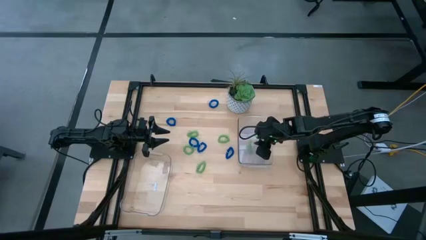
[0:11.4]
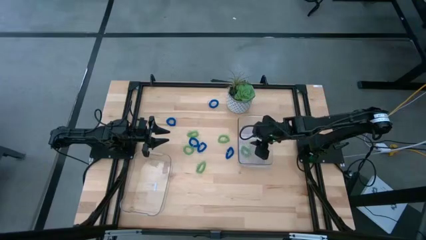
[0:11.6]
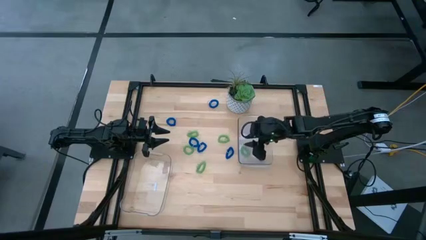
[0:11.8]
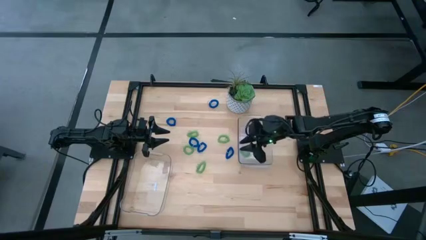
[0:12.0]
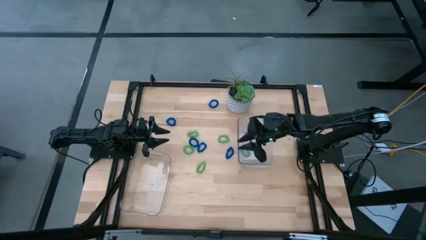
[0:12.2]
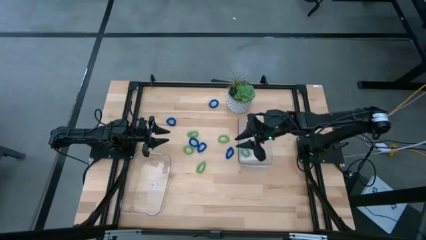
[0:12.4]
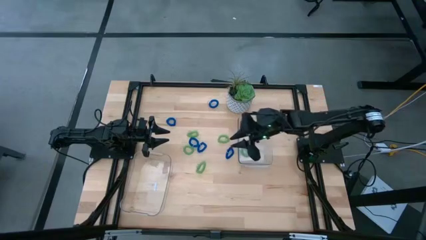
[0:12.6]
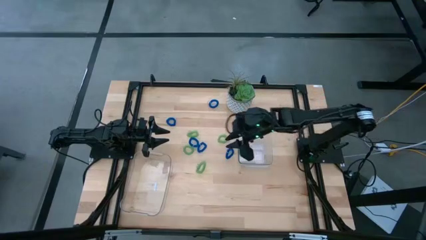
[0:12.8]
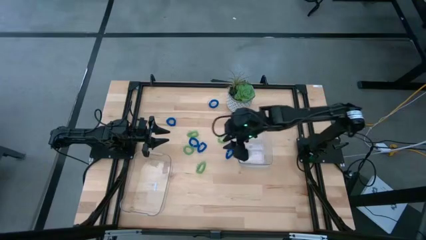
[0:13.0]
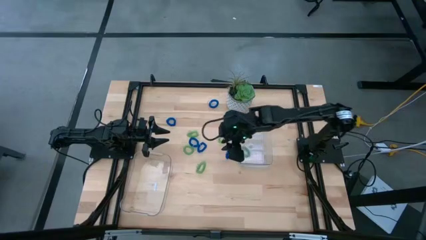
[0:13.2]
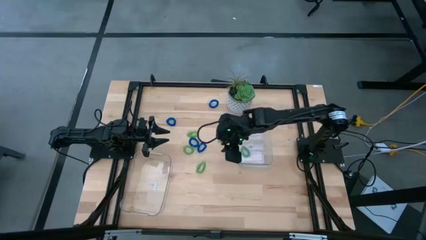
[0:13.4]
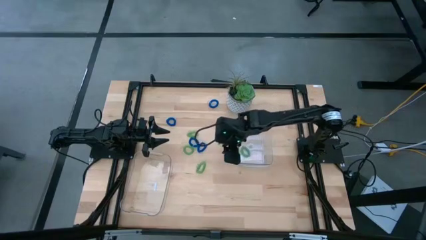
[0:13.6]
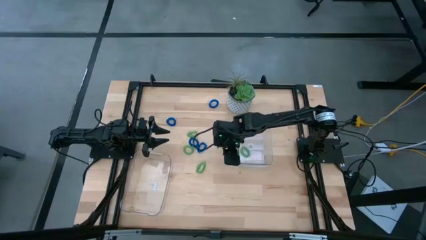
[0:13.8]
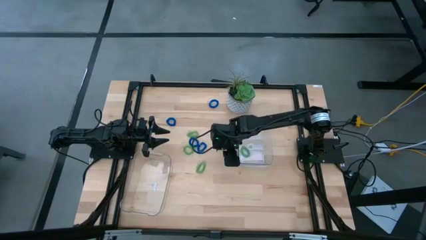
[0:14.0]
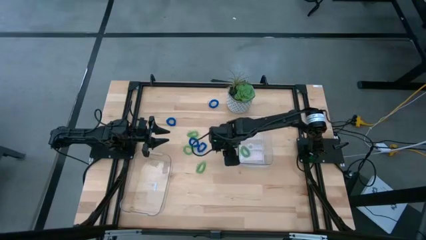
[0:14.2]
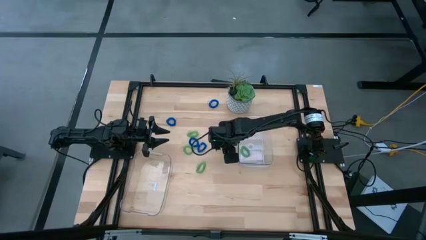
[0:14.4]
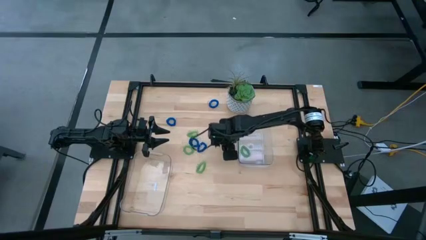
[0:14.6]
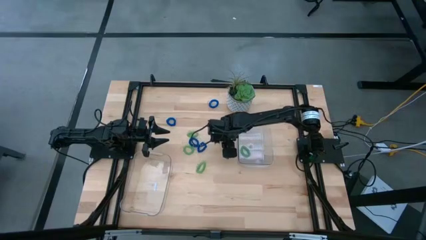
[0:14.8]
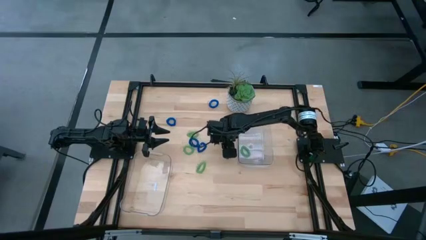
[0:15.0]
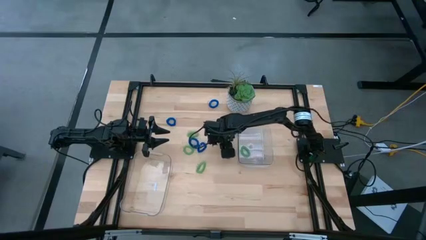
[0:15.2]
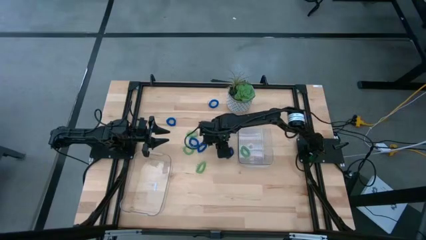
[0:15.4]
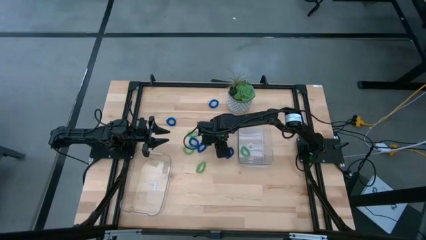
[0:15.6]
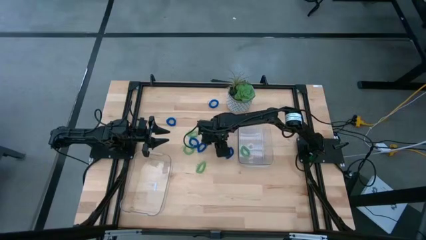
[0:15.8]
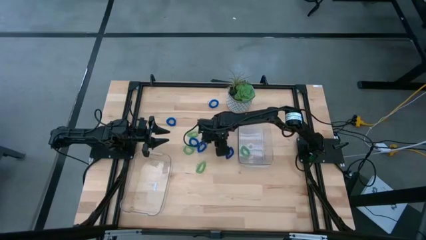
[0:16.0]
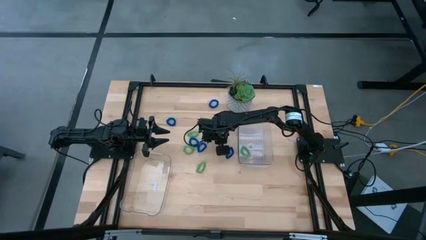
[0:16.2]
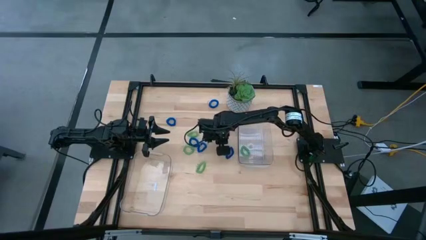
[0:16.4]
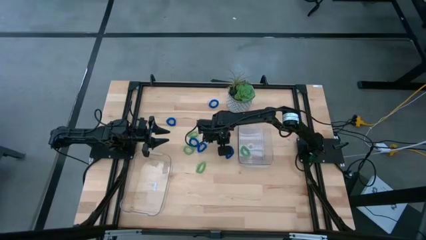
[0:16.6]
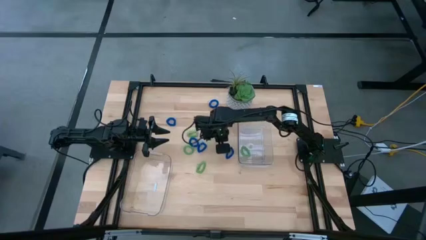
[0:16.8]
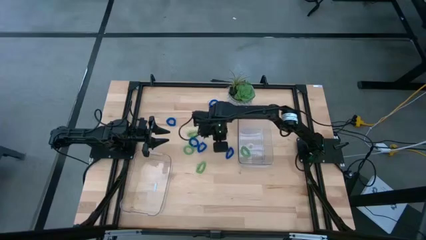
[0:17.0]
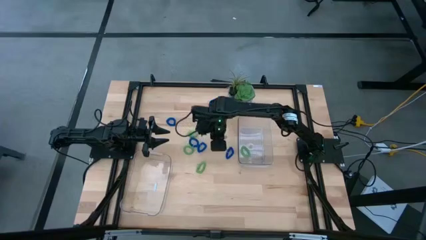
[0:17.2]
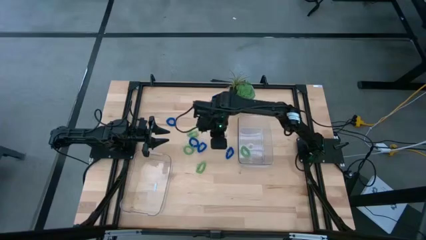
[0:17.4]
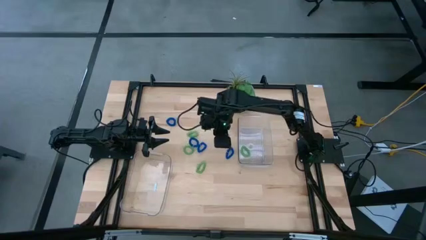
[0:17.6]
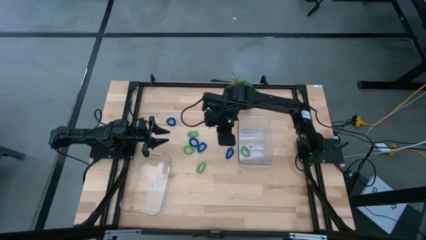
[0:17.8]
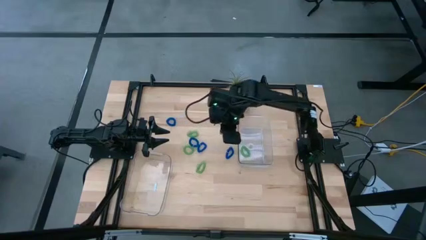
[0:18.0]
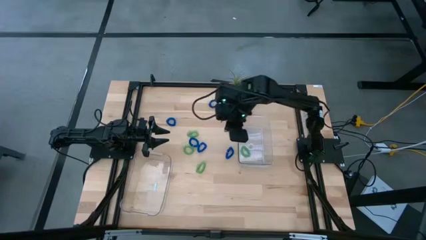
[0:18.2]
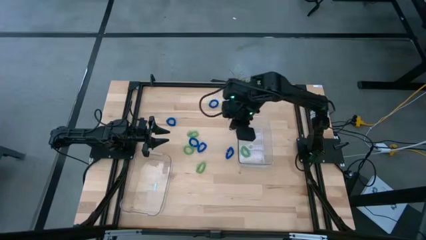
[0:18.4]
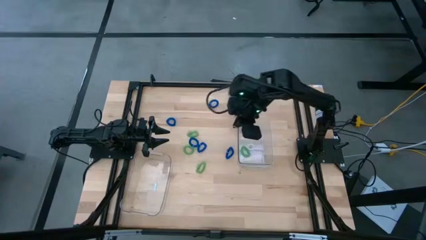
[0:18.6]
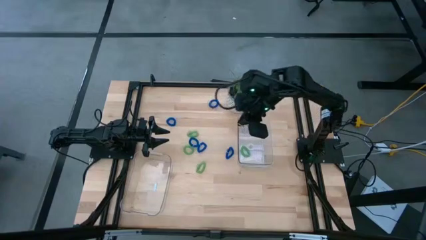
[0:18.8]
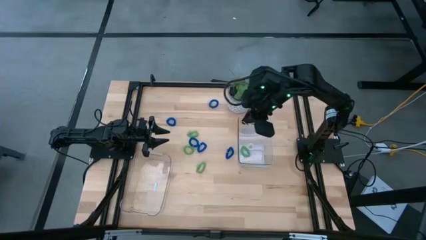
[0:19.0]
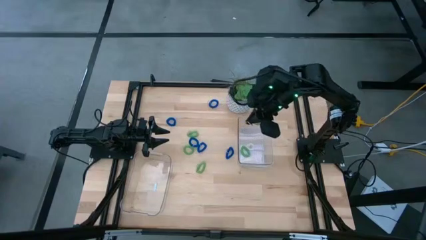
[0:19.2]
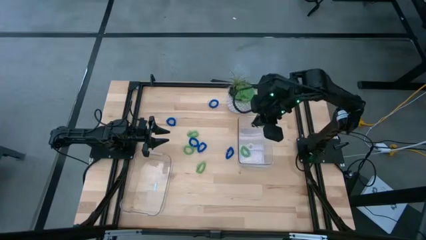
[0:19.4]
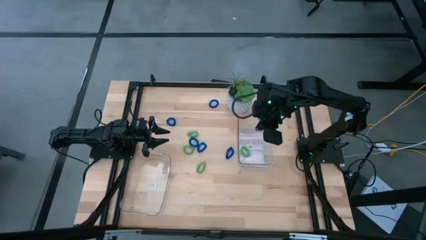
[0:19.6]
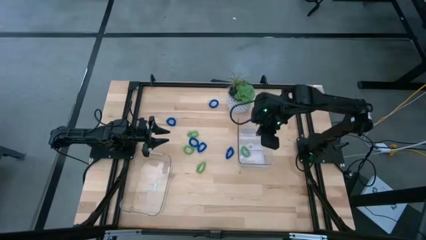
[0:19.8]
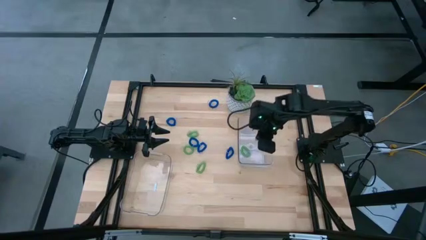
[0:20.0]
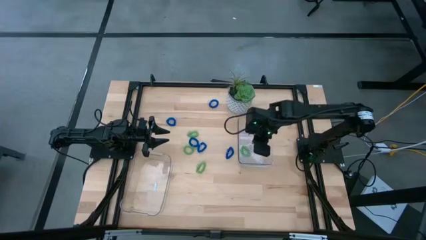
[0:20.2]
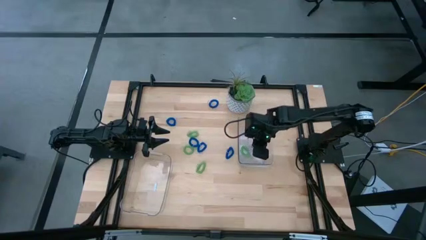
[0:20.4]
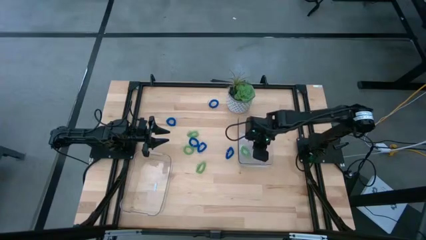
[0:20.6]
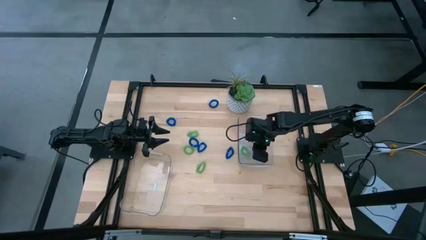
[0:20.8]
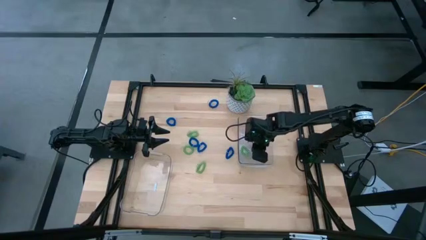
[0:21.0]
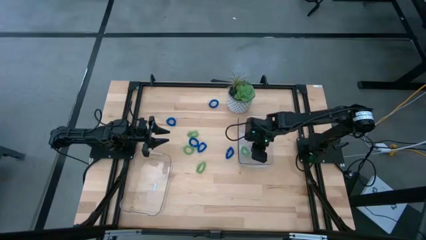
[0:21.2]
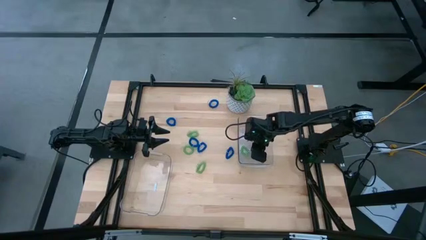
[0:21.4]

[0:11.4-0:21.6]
Task: Sort spring keychains
Put the green spring keychain into the top transparent bin

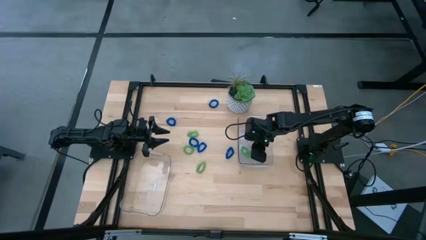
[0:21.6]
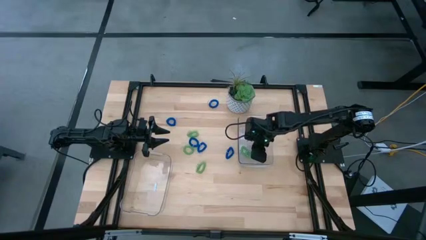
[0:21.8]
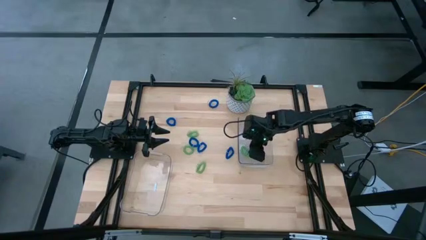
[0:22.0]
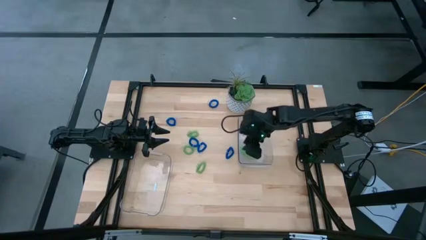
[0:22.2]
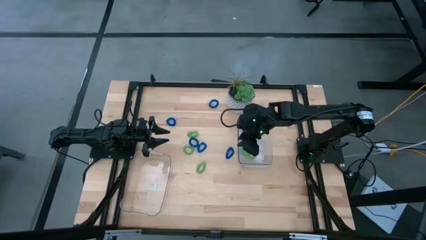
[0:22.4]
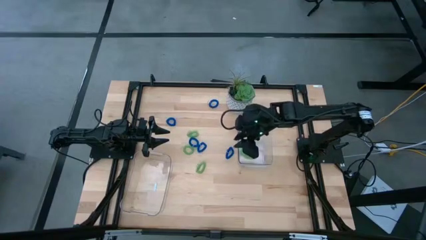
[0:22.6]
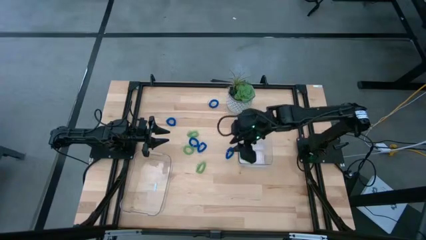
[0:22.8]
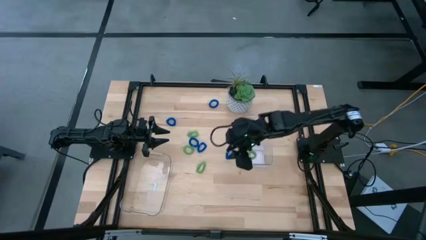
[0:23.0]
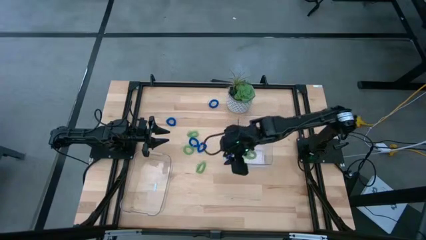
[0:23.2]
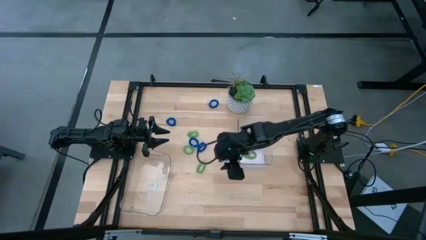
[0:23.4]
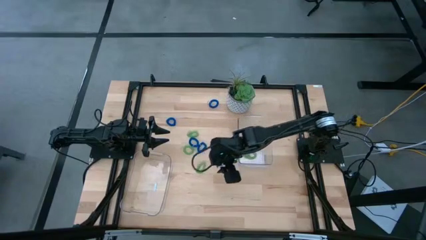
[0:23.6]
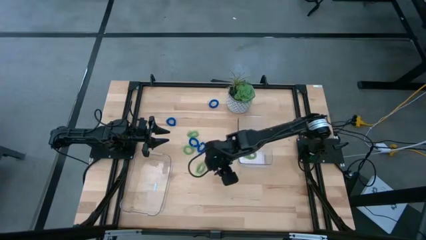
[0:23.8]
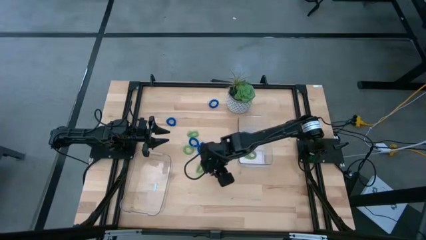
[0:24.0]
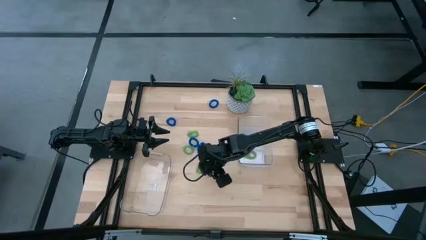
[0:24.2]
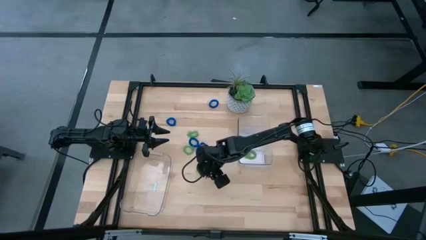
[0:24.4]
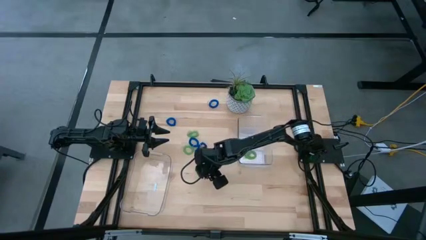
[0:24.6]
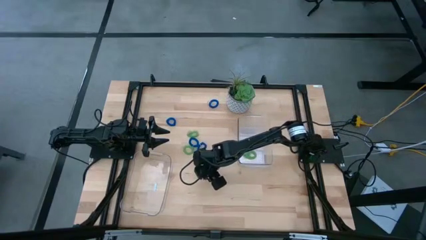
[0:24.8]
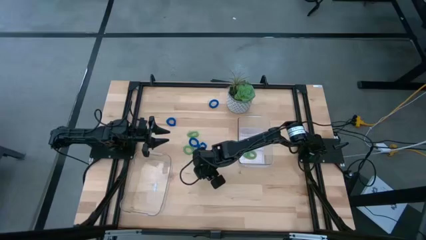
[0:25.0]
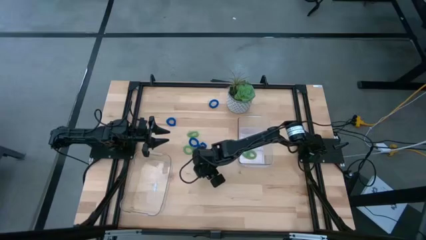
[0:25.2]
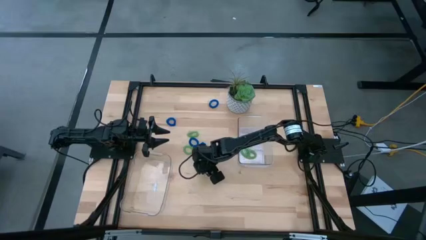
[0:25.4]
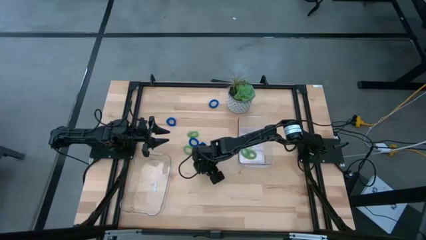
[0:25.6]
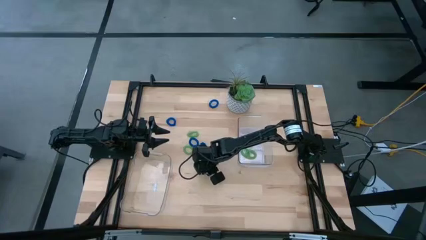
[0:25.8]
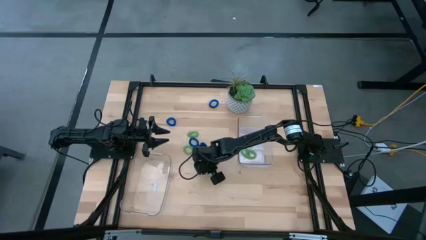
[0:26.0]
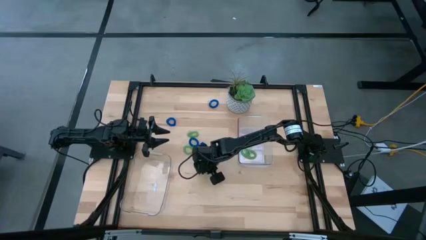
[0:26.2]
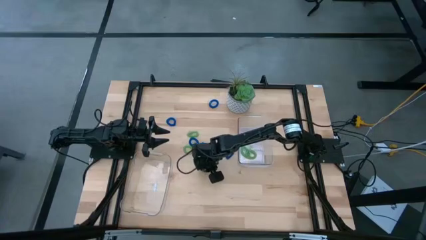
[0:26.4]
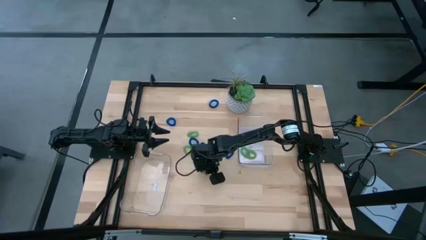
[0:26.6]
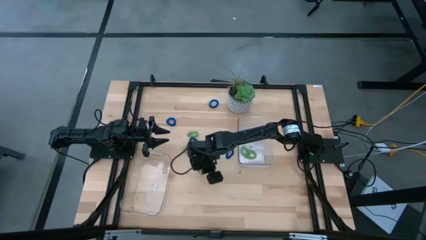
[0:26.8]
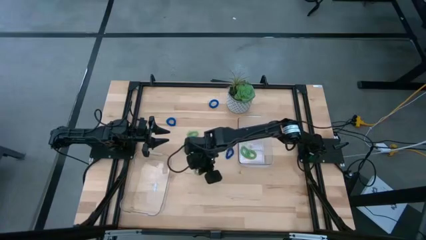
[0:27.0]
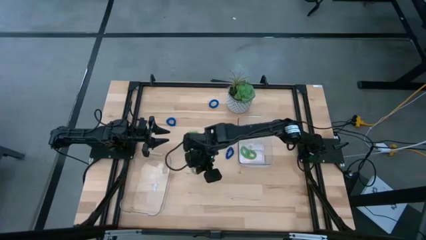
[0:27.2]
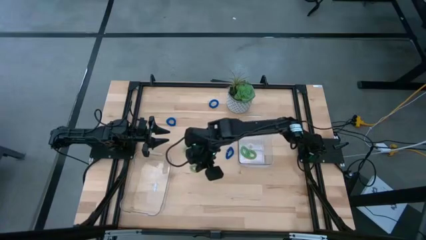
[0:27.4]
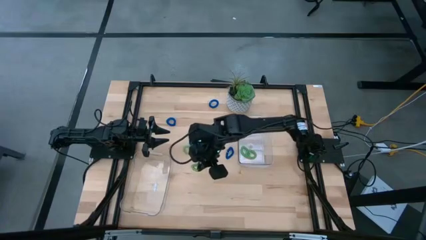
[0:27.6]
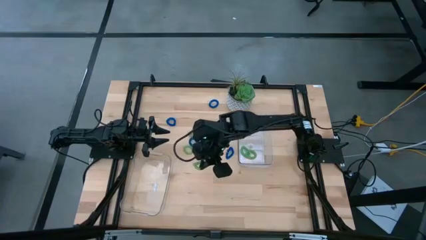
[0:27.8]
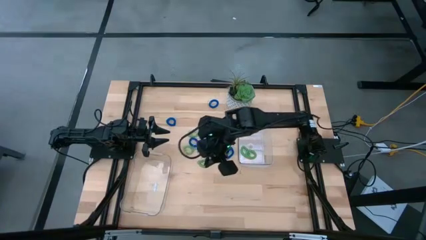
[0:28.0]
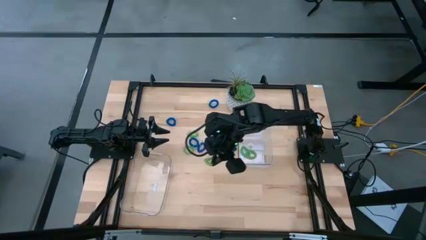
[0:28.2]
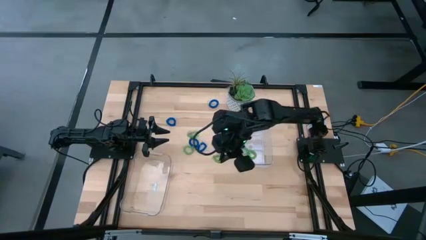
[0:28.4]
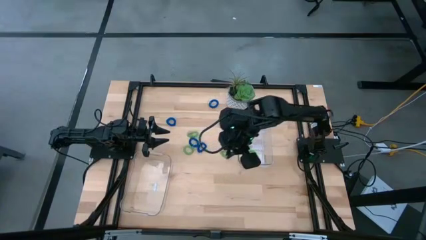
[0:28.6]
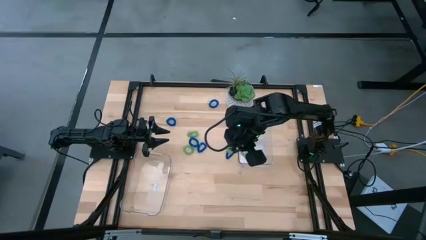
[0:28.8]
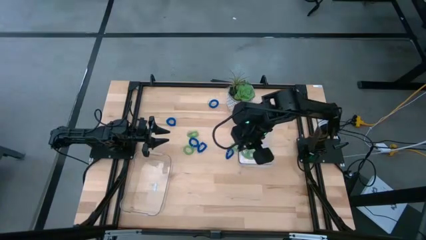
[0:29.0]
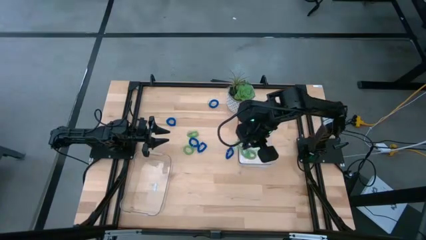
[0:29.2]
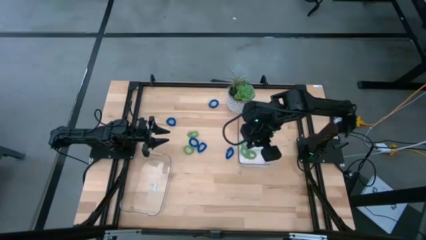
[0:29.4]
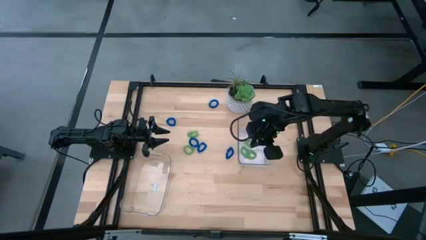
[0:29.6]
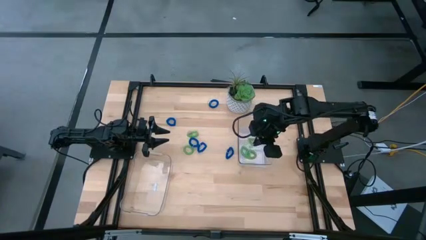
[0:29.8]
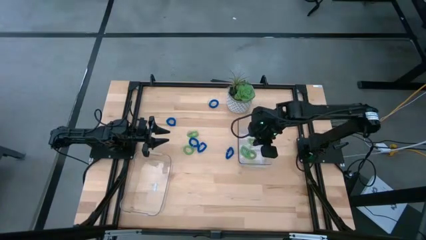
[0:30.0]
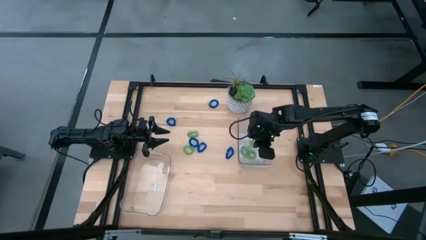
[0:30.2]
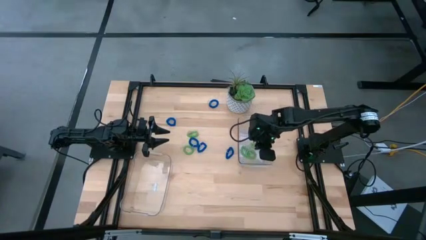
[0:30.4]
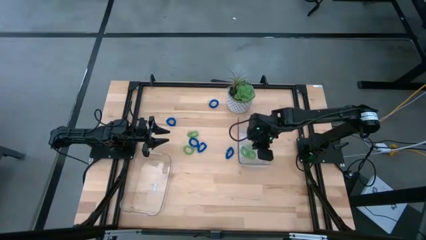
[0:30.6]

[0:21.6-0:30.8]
Put the green spring keychain into the top transparent bin
